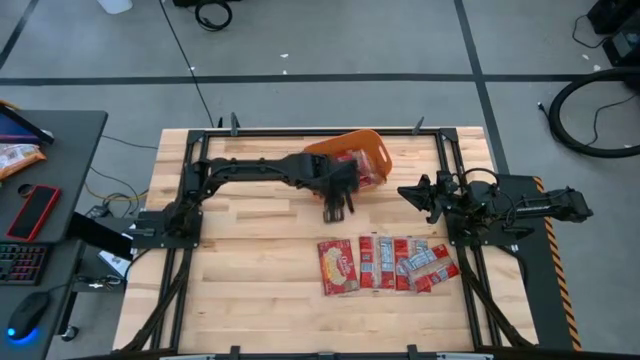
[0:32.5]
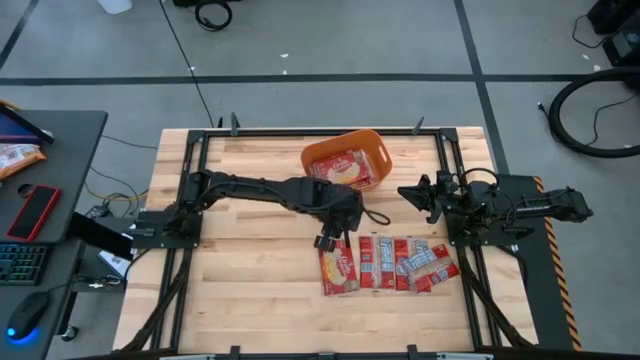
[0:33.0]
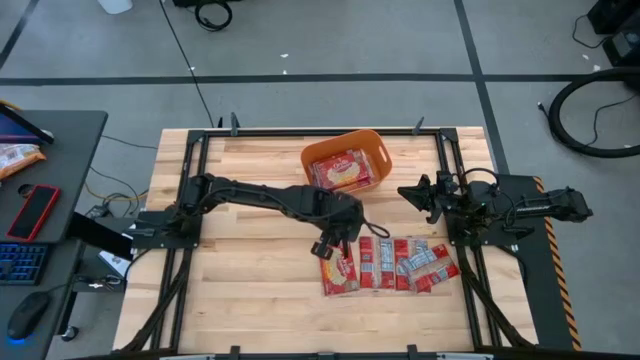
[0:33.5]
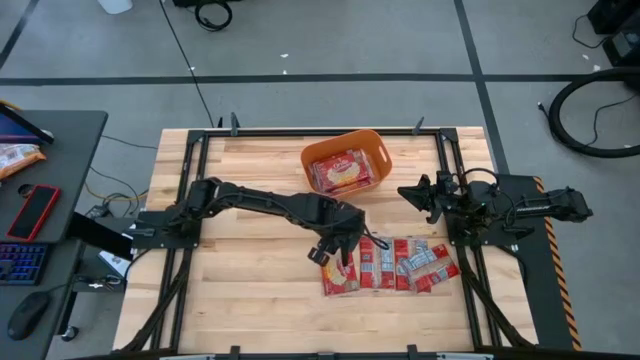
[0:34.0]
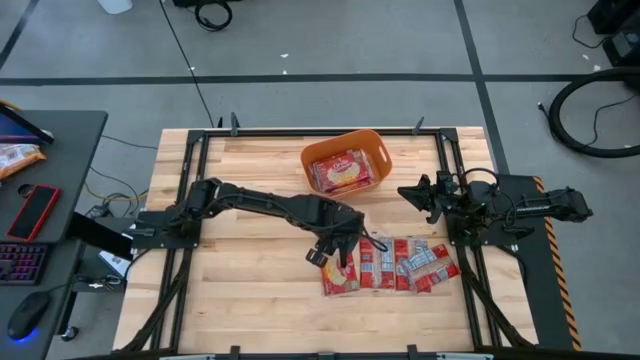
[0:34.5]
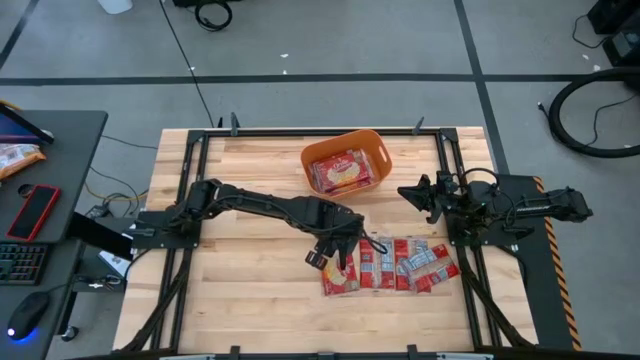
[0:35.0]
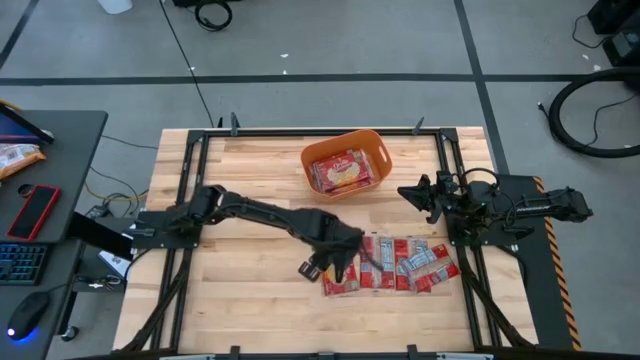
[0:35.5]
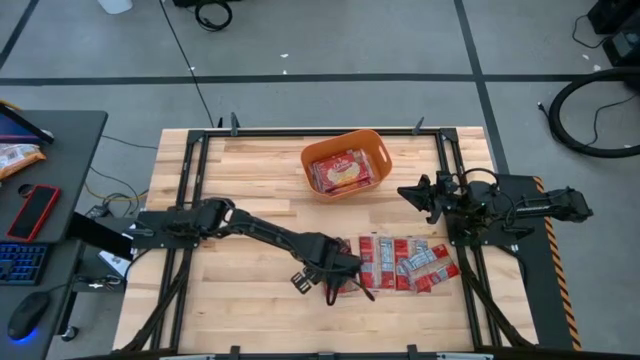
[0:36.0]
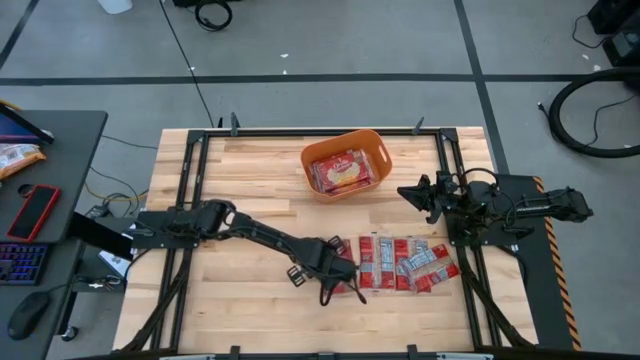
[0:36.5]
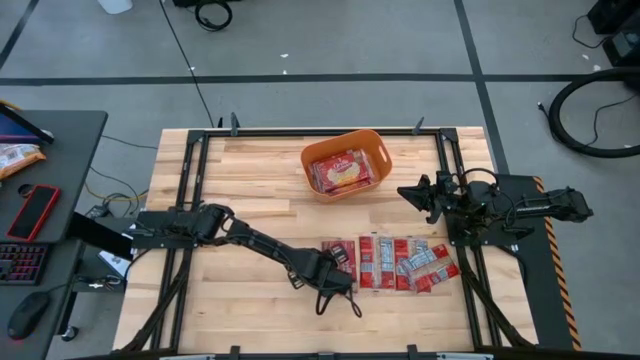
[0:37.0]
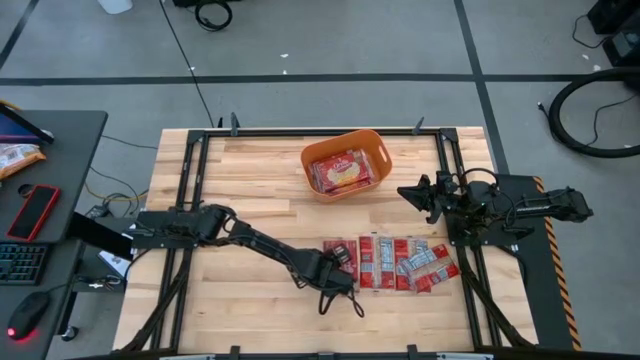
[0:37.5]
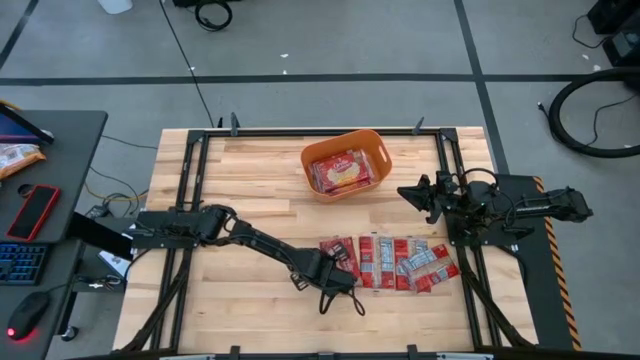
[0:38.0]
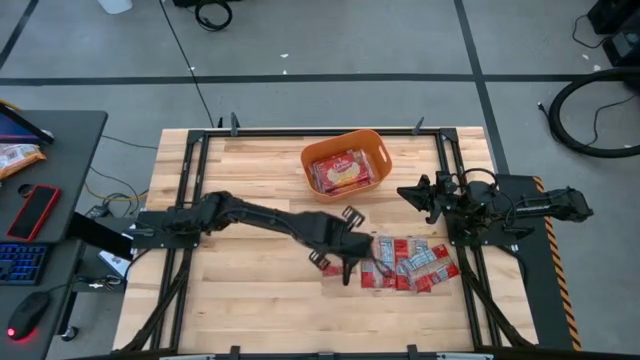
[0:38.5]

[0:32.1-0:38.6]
Task: Sort popcorn bags into baskets
Put the red popcorn bag into the orange bin

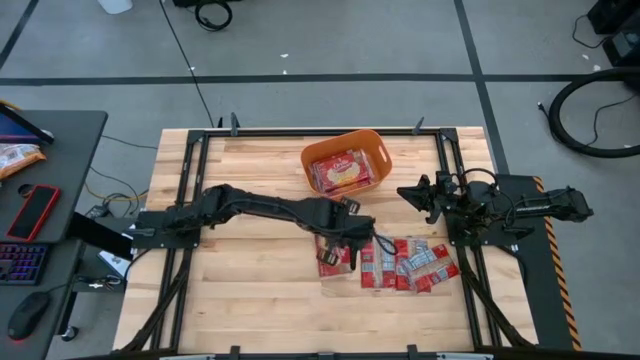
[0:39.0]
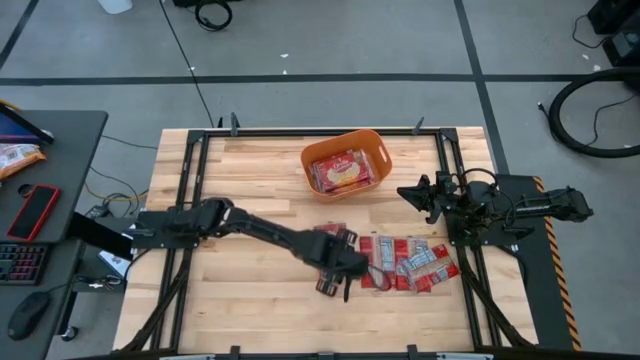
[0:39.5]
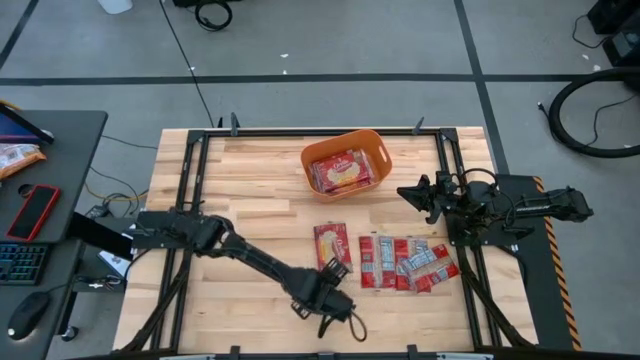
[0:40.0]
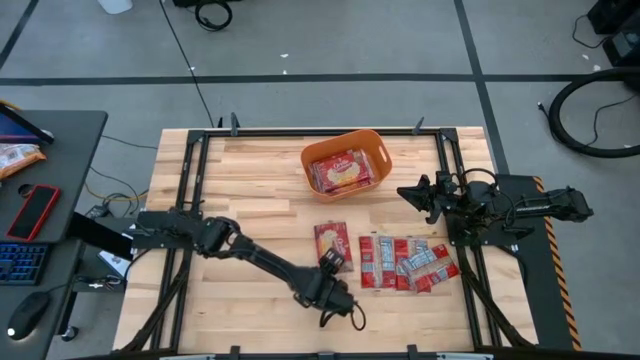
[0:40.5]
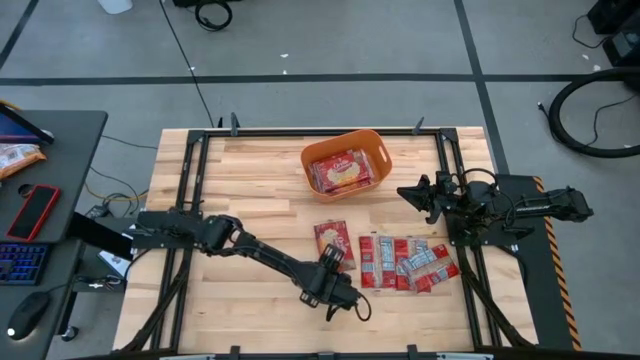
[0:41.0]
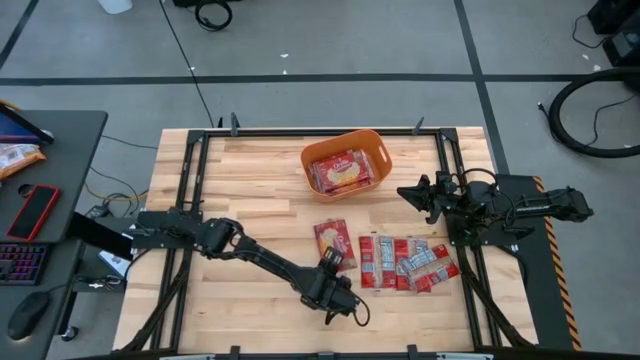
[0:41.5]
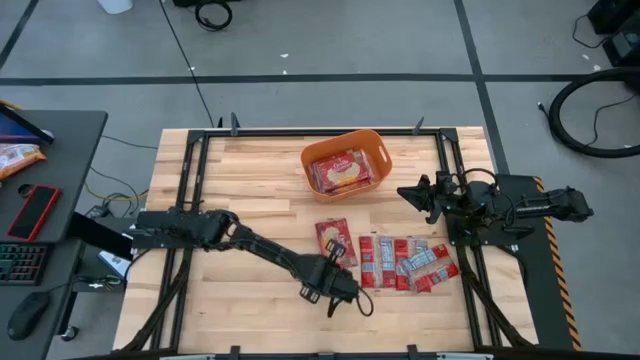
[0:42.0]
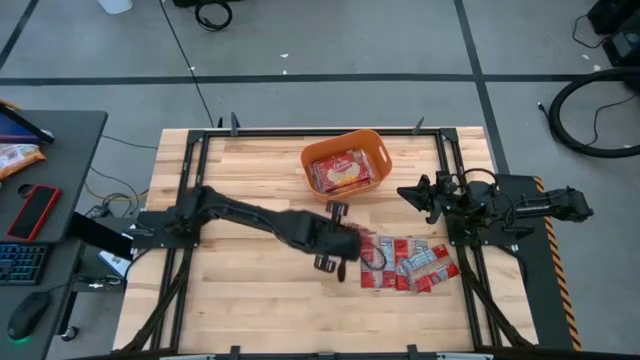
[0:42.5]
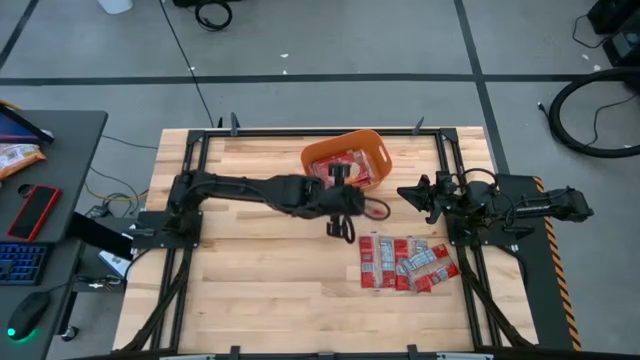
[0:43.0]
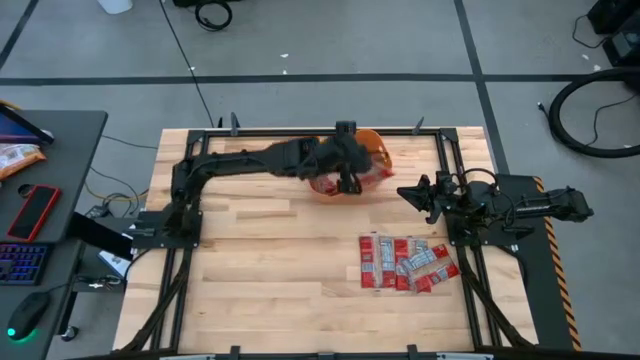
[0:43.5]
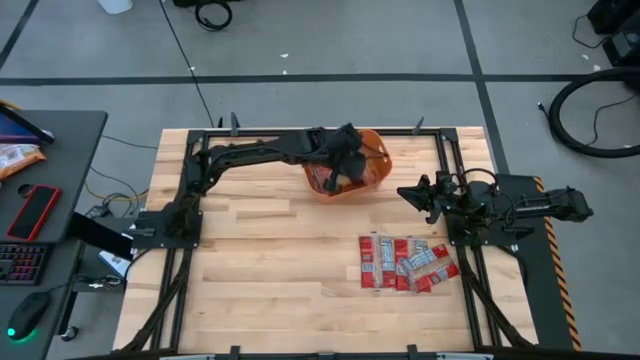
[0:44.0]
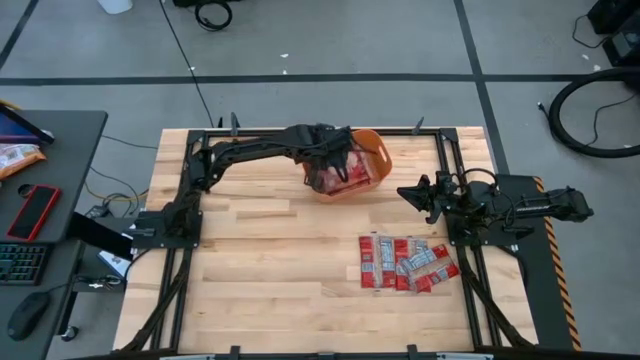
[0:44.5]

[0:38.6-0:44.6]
Put the red popcorn bag into the orange bin

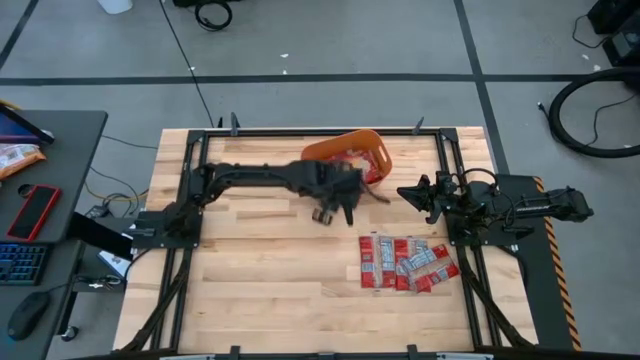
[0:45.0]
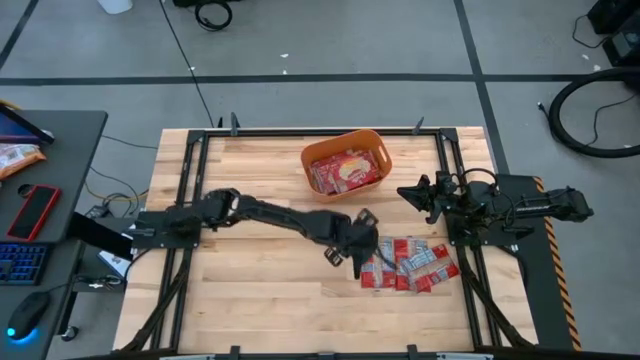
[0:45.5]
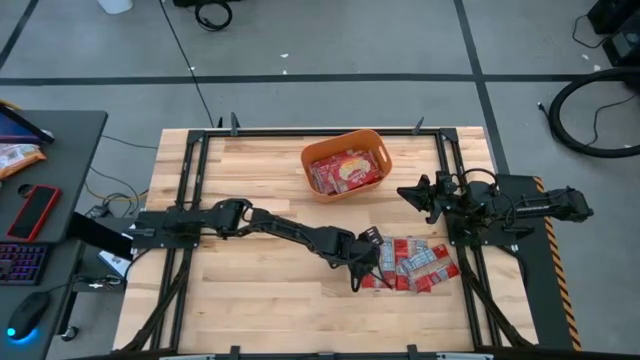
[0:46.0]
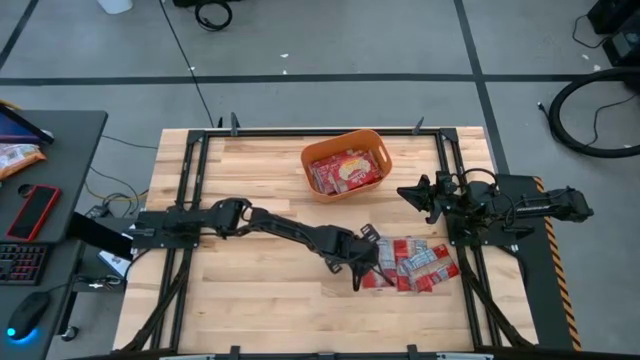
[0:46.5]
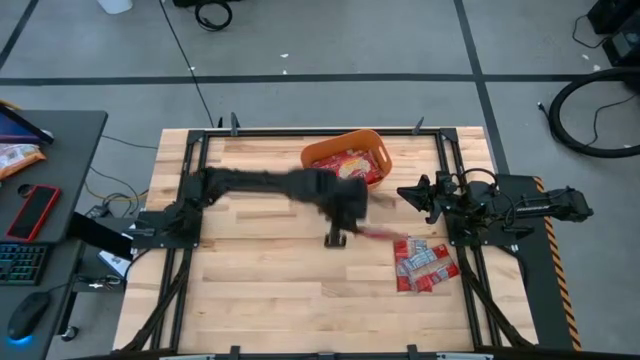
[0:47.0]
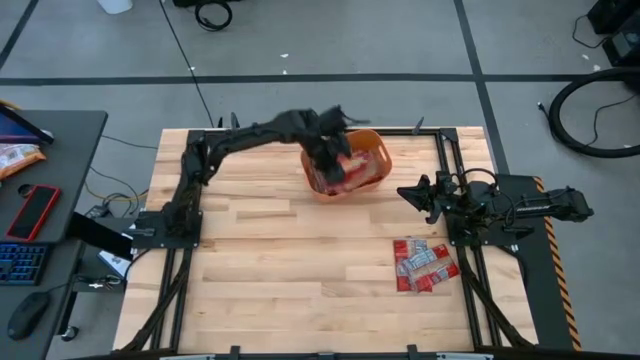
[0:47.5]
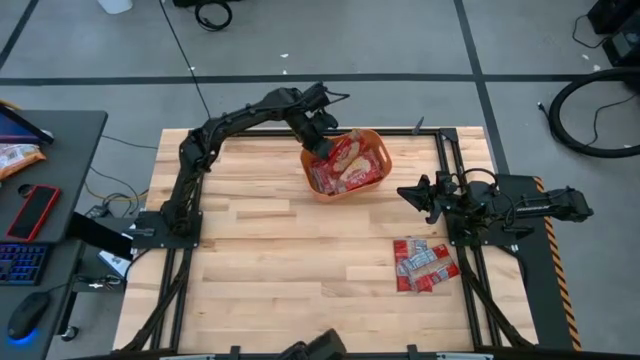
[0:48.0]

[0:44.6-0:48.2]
Put the red popcorn bag into the orange bin

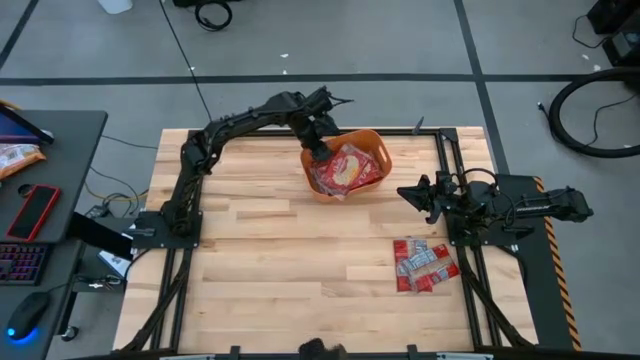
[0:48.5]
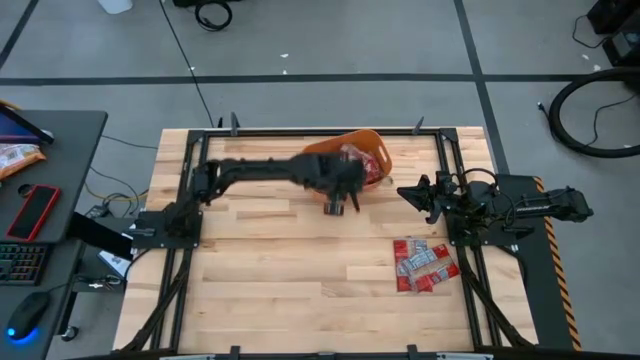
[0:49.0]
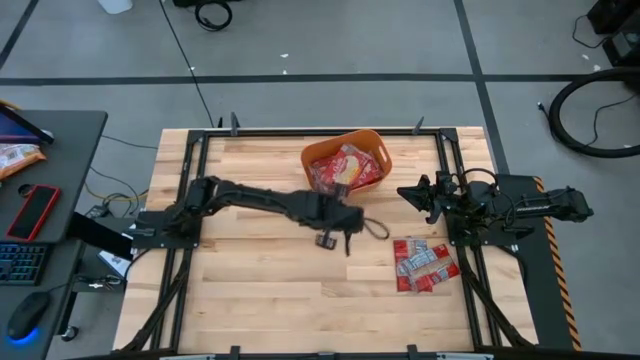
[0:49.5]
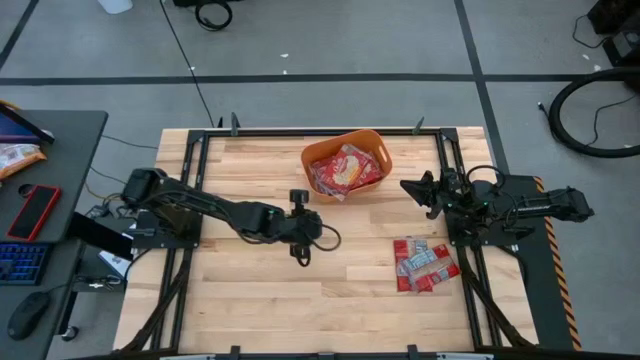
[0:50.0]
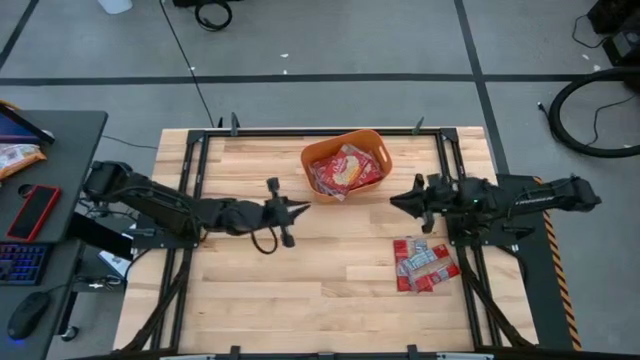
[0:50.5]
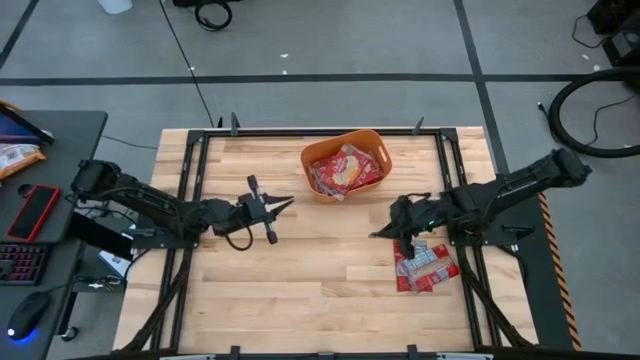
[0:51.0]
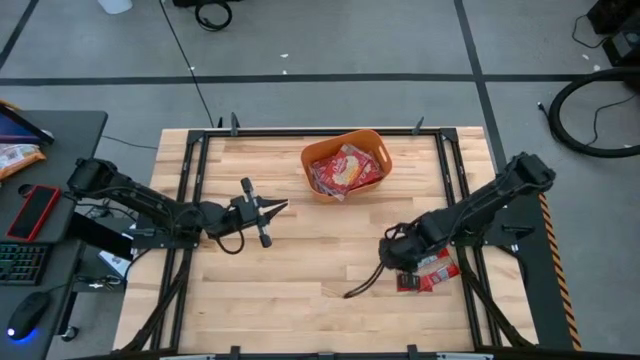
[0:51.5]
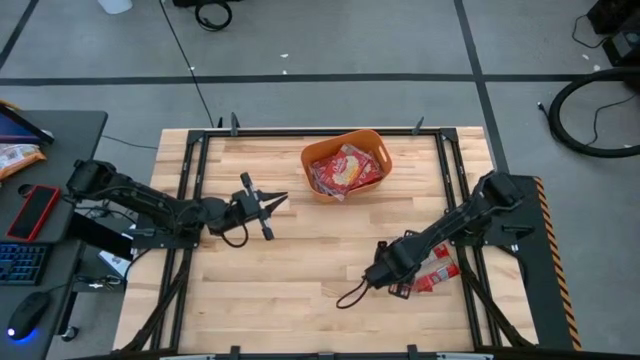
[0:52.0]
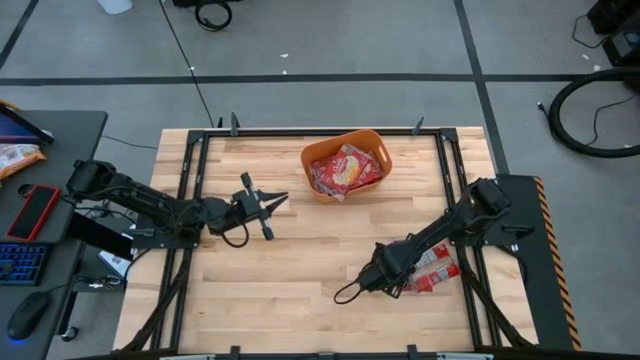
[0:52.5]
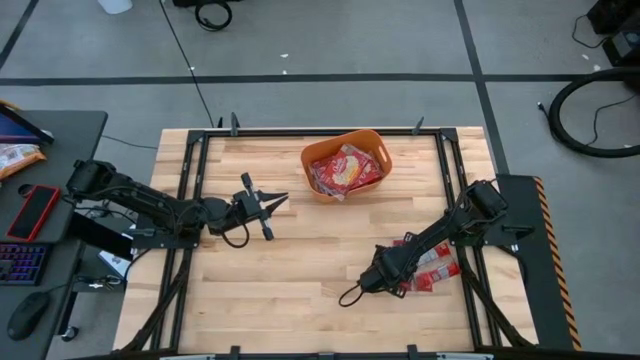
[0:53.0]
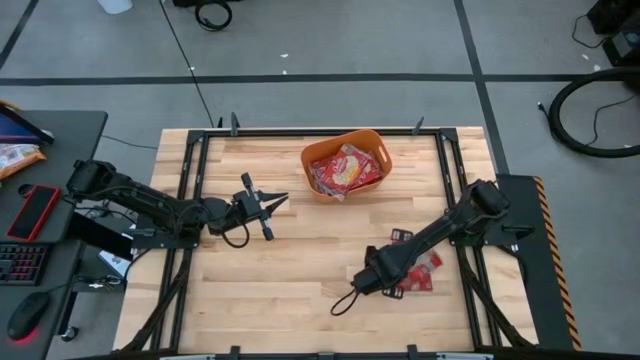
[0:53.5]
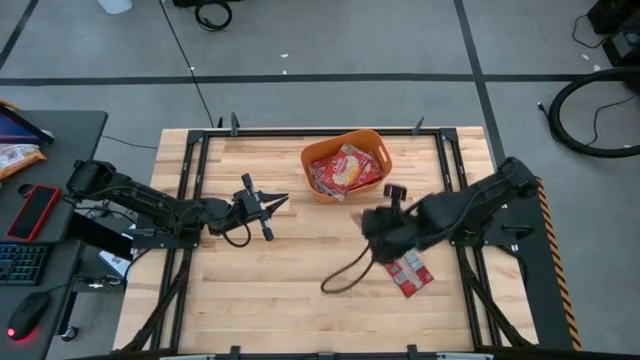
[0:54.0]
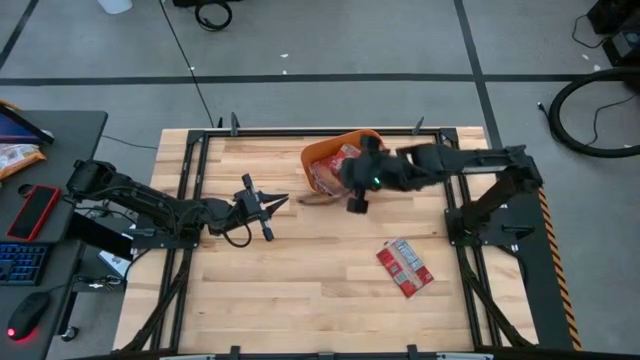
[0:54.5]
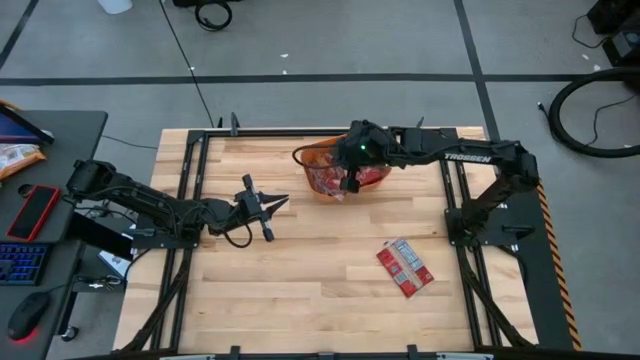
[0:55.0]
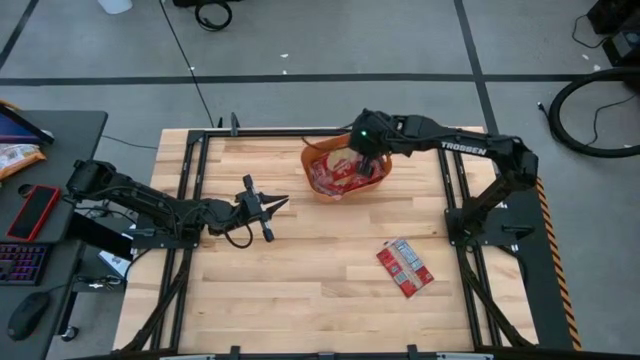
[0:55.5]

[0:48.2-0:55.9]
Put the red popcorn bag into the orange bin
